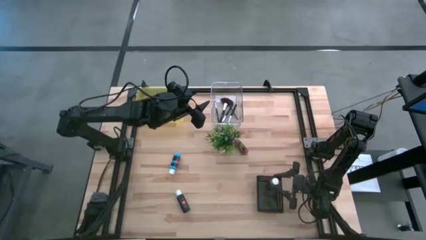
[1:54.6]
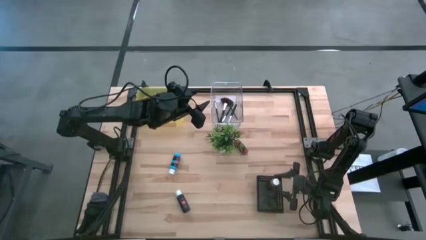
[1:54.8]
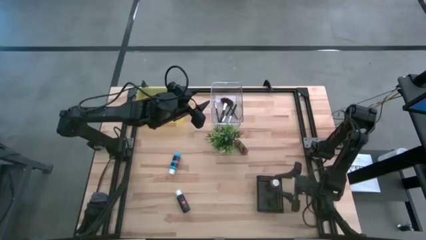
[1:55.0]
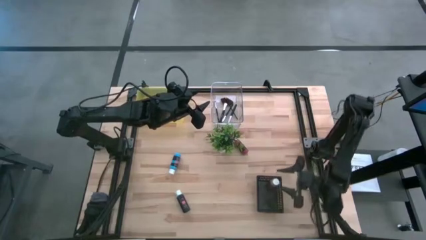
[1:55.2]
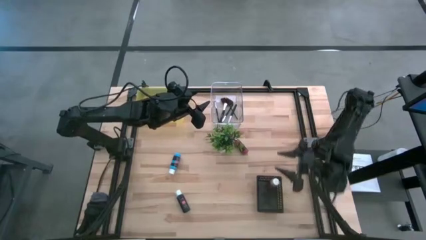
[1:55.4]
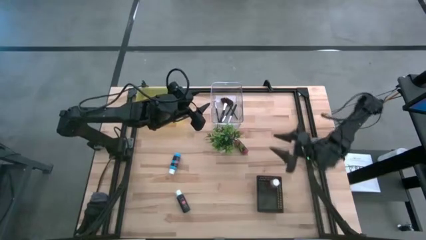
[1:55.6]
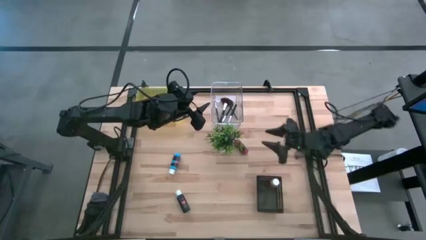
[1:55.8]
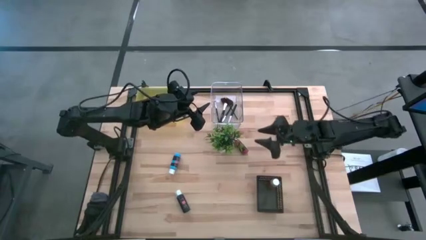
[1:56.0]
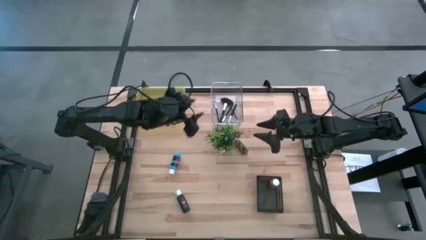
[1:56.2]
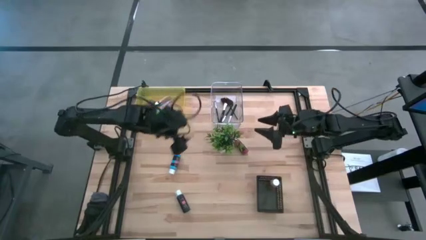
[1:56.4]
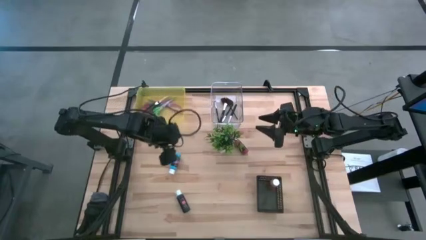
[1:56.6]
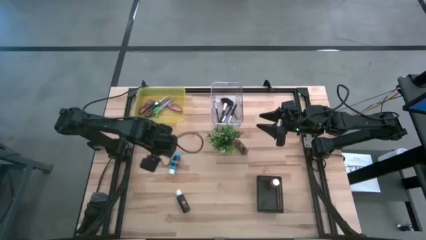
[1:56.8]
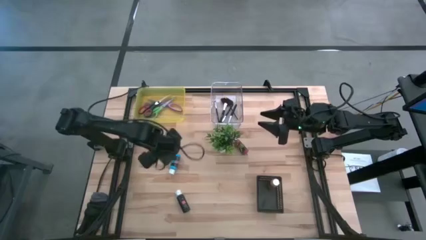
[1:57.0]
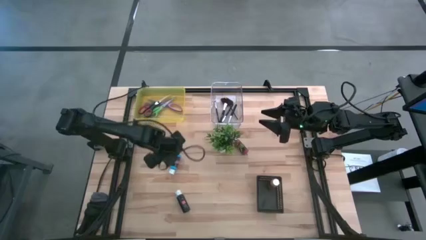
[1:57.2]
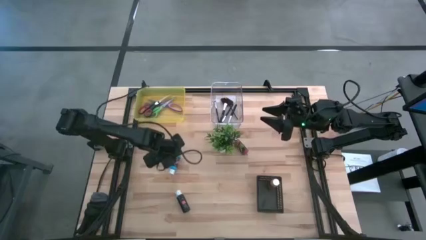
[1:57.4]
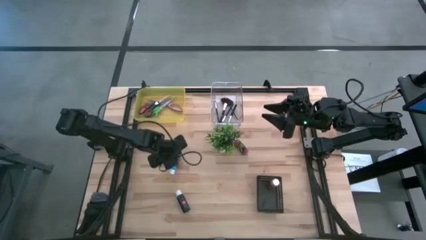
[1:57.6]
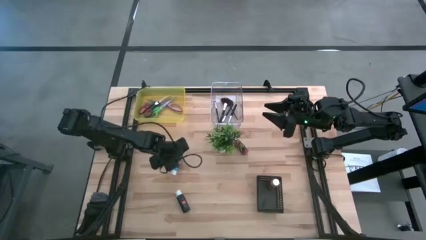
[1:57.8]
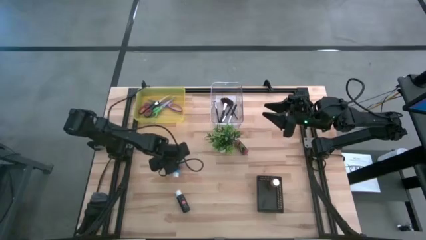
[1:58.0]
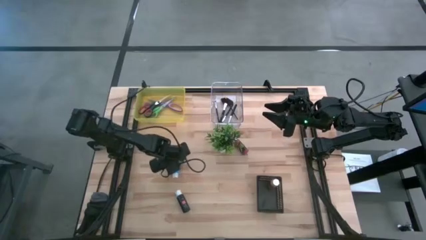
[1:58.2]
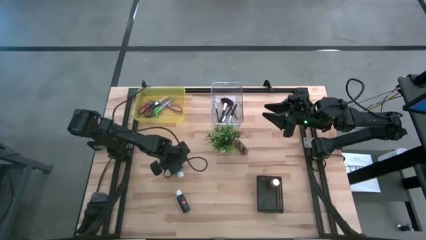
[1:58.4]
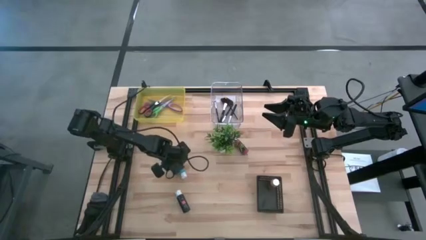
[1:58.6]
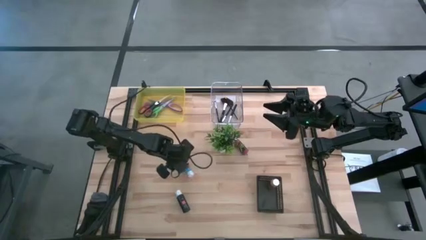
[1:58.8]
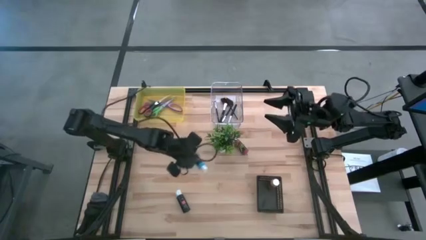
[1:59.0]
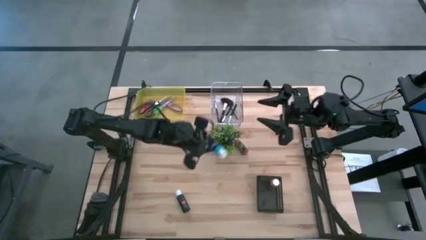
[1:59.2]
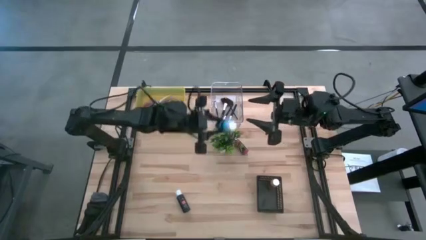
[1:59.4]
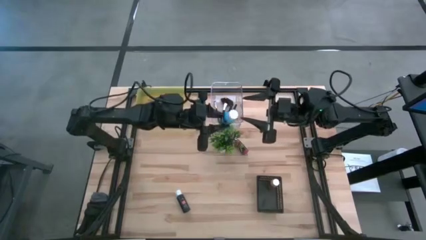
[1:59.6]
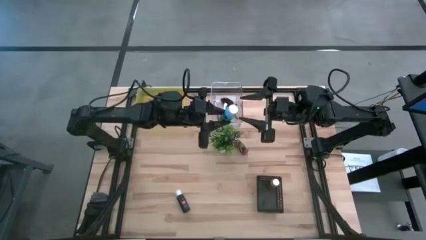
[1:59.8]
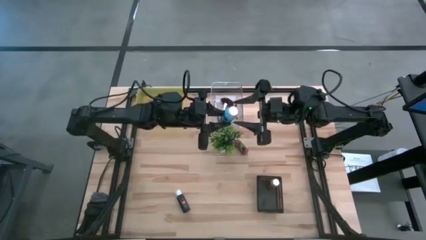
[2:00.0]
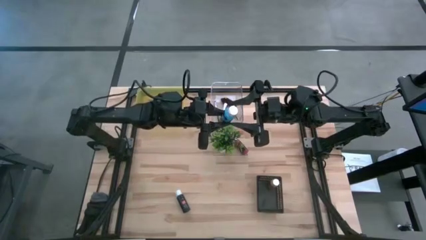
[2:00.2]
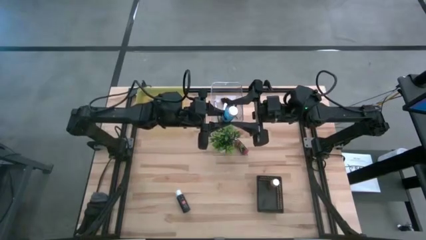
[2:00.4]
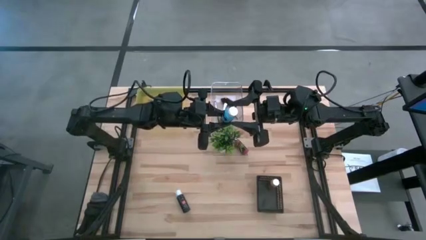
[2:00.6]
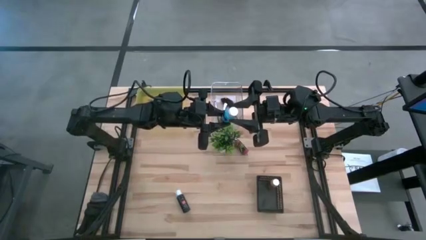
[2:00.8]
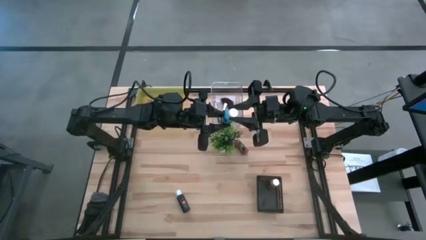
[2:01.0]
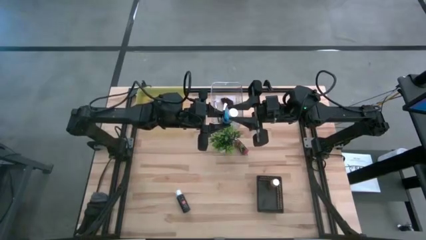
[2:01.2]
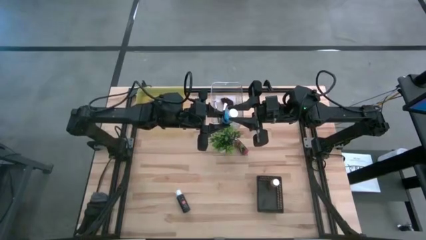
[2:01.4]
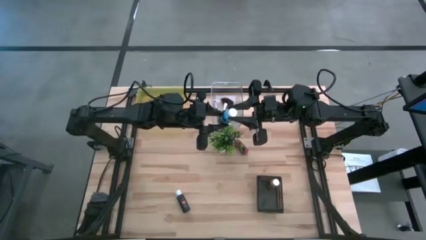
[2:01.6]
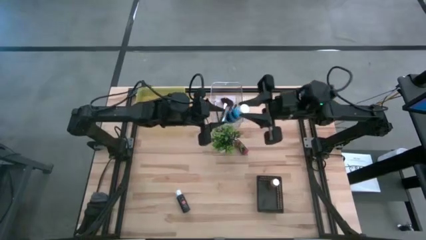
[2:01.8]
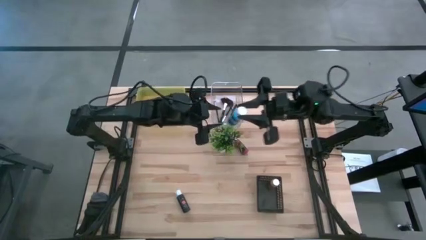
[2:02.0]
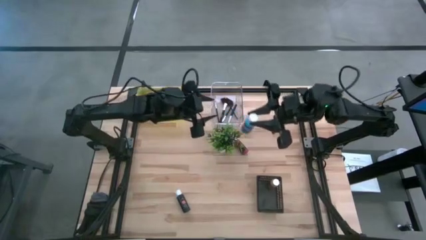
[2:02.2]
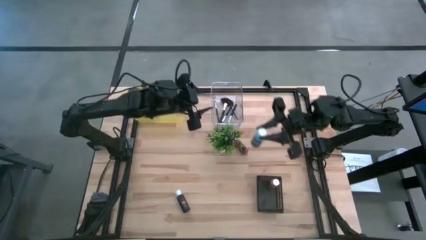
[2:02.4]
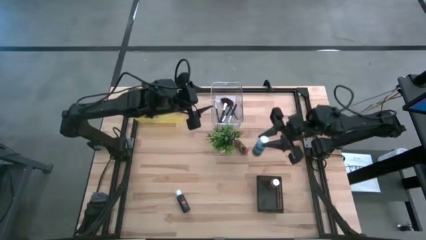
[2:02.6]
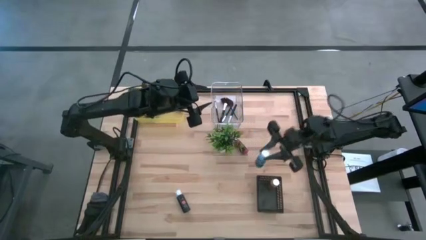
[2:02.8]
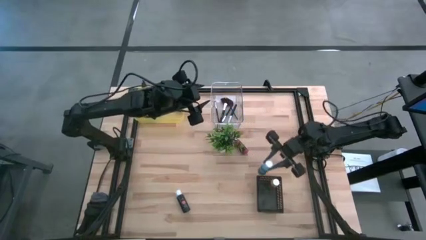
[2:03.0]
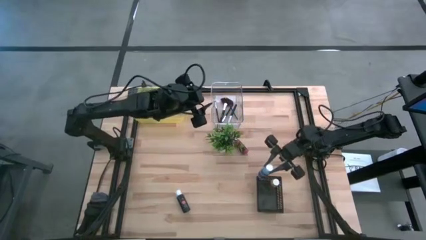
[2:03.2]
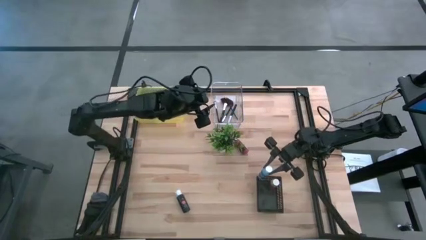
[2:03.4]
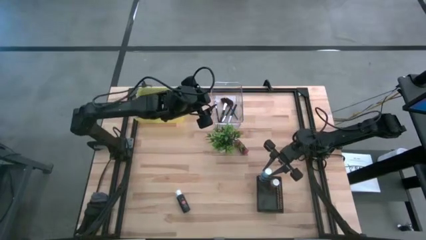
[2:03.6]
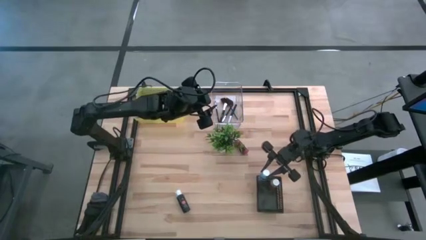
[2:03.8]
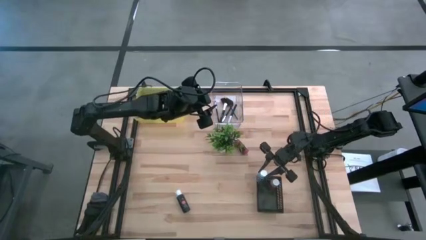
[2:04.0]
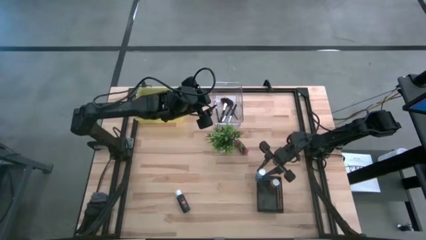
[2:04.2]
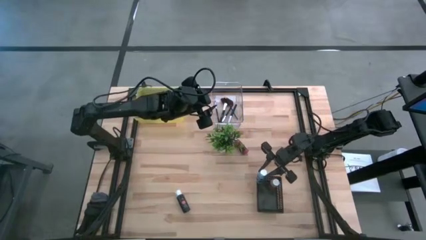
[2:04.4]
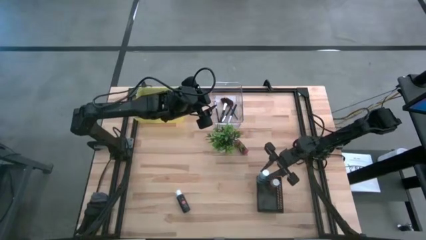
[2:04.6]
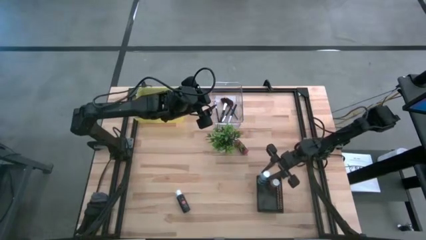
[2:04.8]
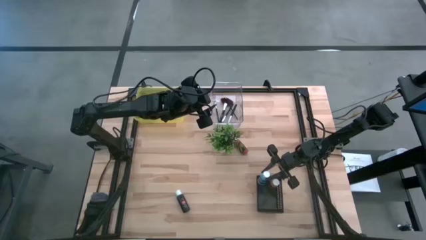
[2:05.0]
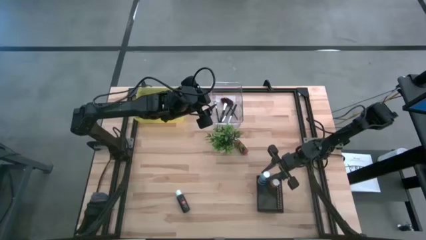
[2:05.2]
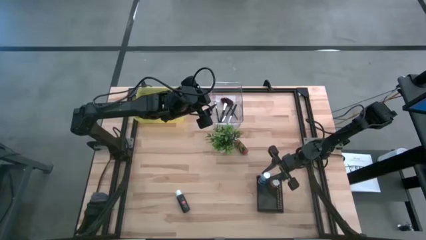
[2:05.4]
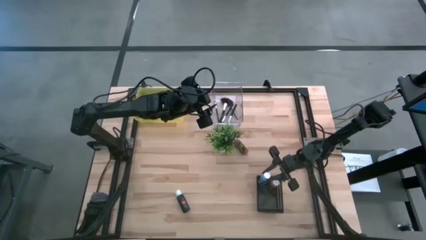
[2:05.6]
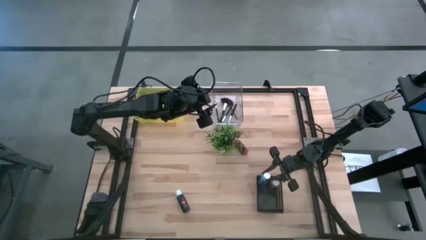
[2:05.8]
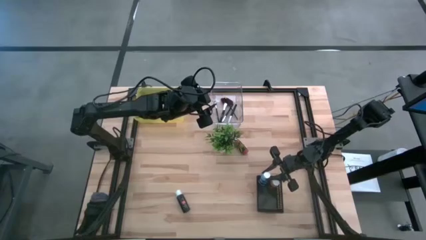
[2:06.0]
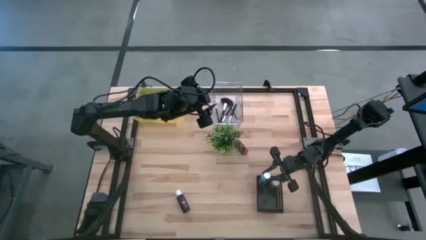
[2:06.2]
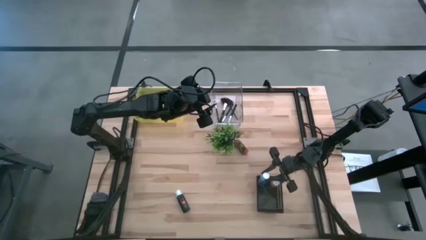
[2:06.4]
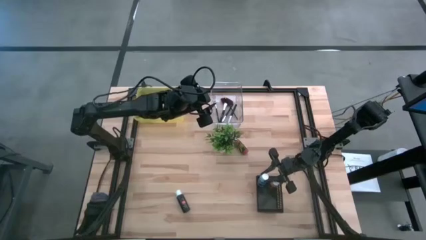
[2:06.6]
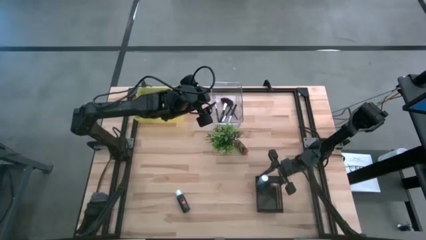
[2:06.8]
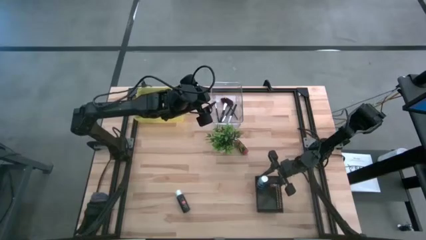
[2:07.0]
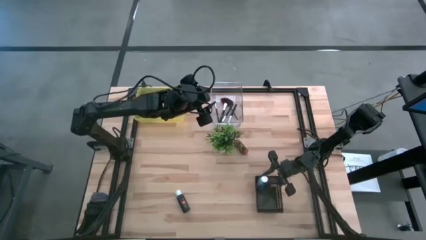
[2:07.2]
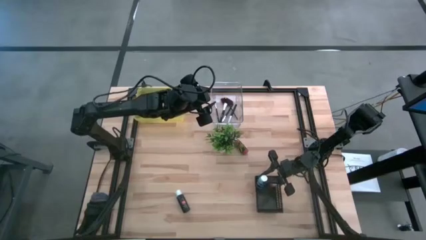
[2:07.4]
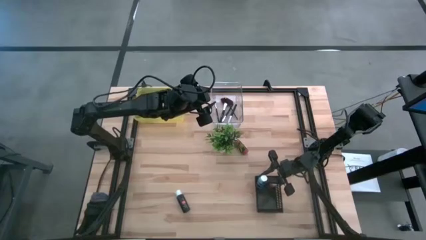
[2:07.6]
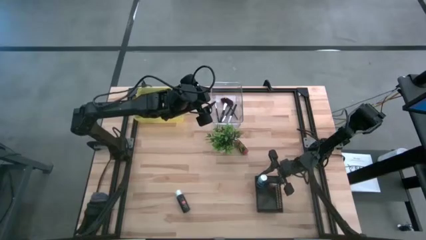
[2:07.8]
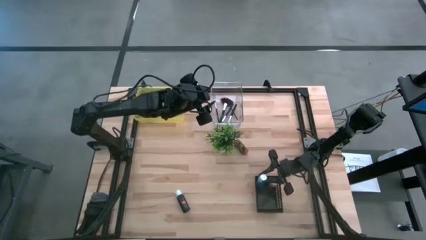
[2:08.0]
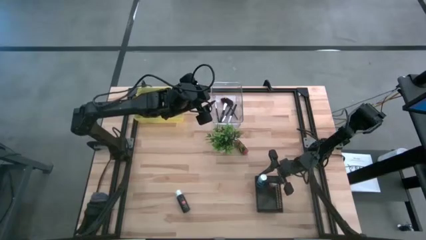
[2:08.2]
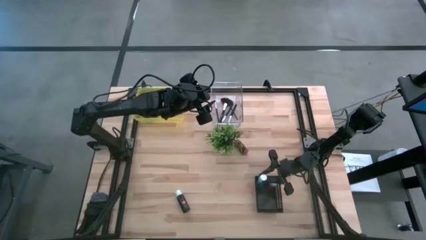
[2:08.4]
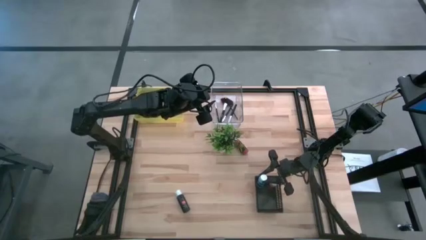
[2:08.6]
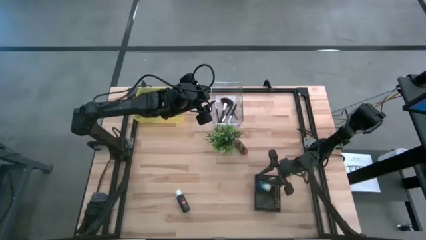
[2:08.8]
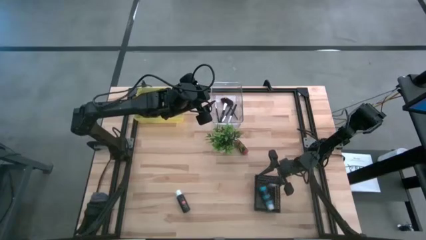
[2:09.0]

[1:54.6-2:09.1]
Task: Pick & Place Paint Supplies
Put the blue paint bottle into the black bin
